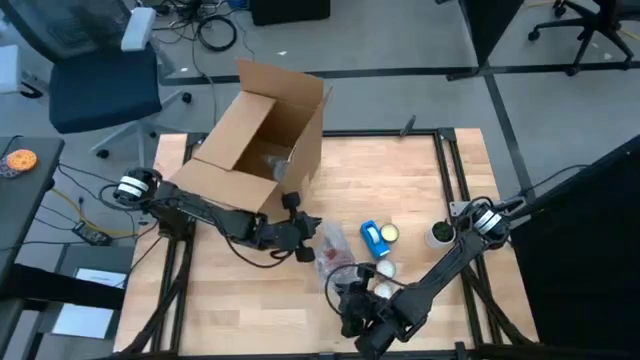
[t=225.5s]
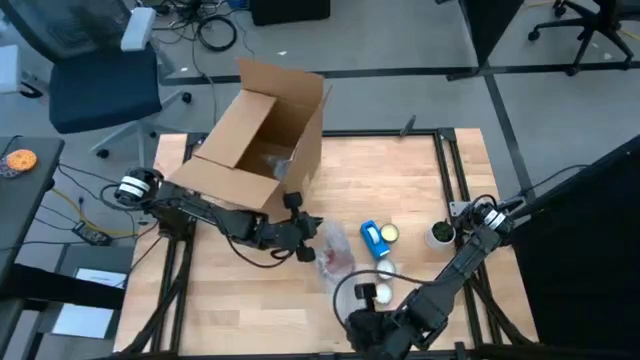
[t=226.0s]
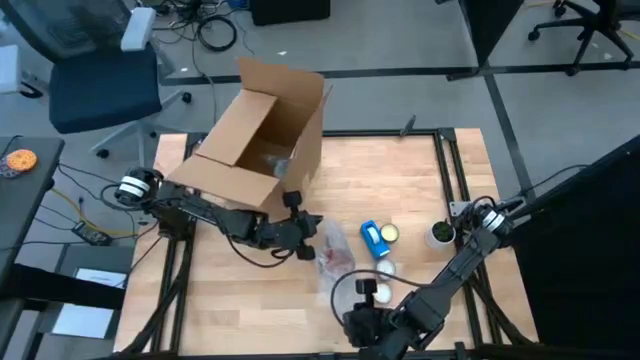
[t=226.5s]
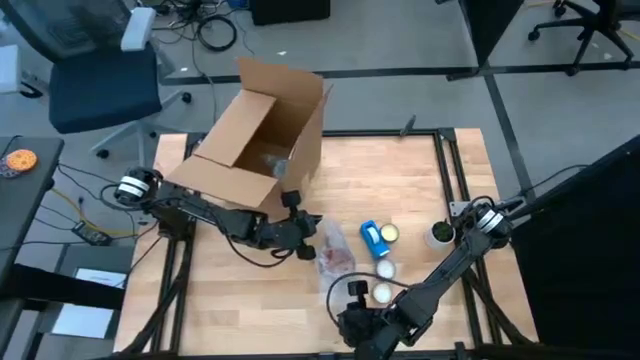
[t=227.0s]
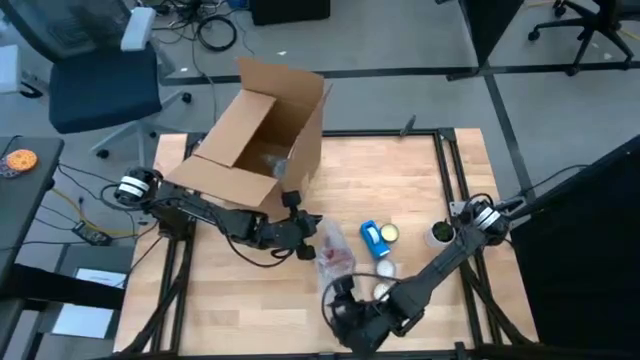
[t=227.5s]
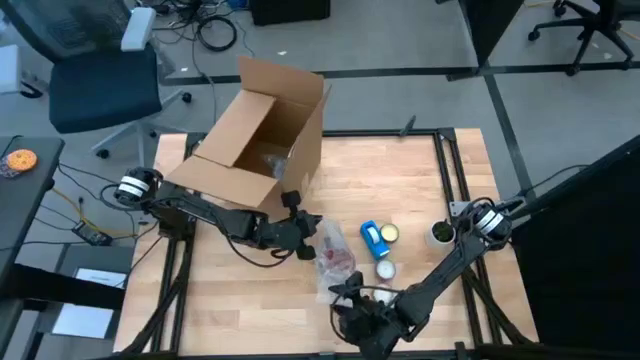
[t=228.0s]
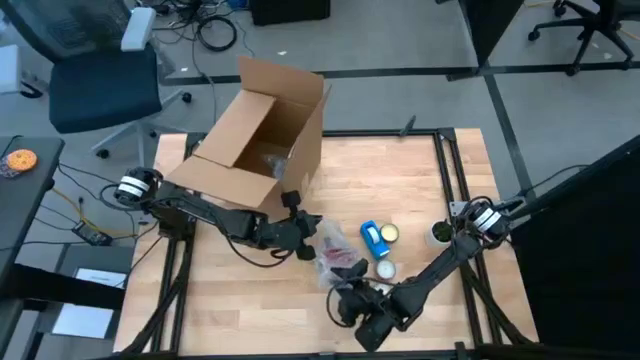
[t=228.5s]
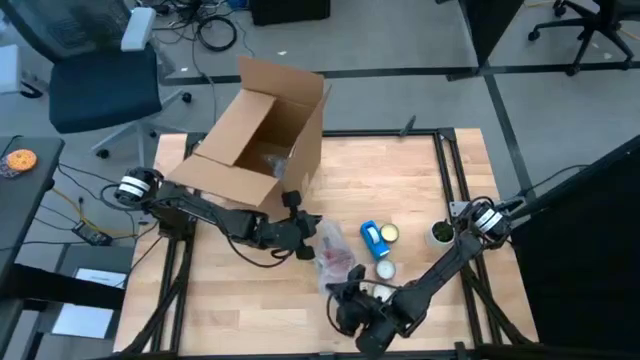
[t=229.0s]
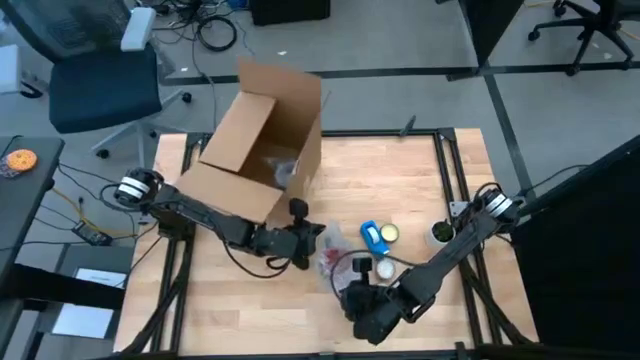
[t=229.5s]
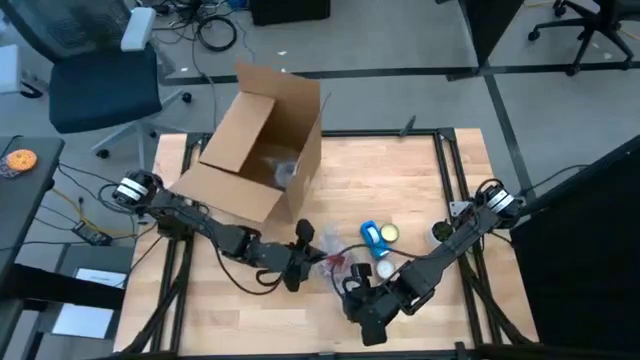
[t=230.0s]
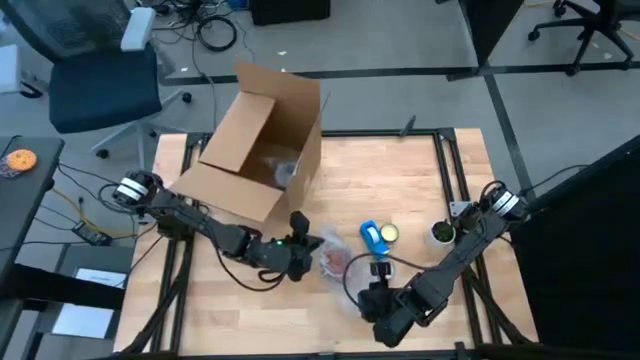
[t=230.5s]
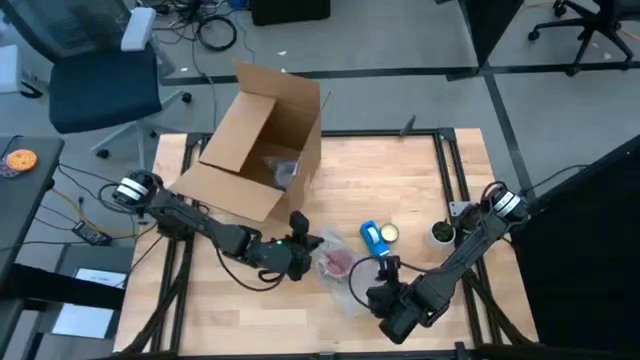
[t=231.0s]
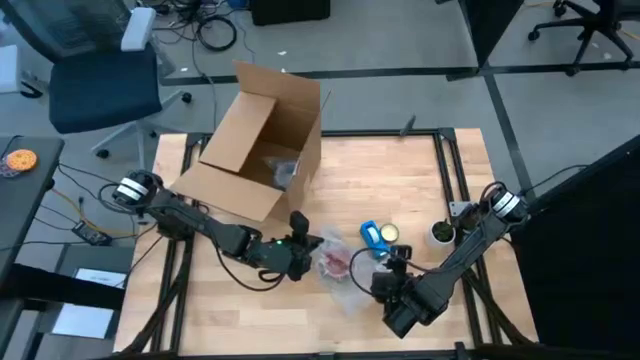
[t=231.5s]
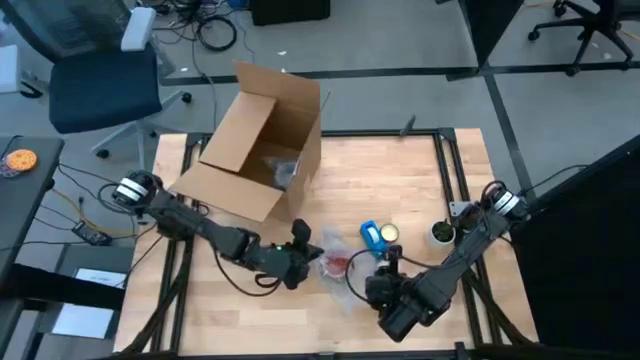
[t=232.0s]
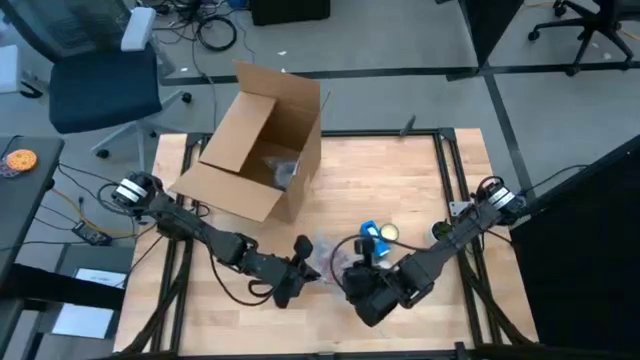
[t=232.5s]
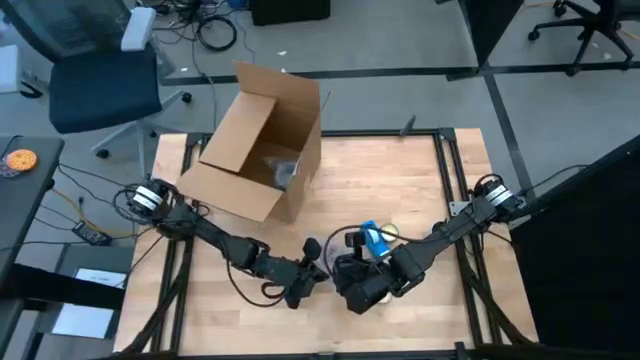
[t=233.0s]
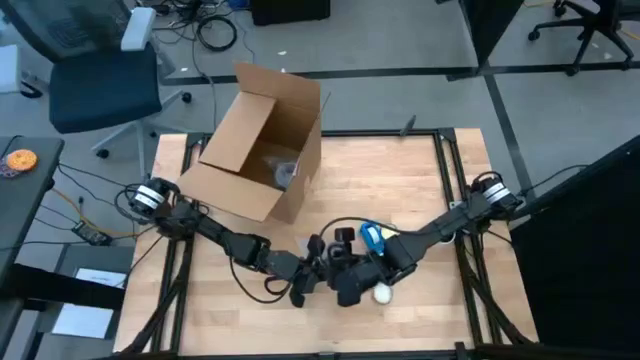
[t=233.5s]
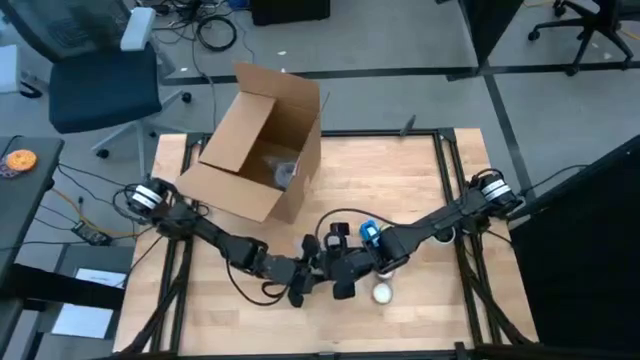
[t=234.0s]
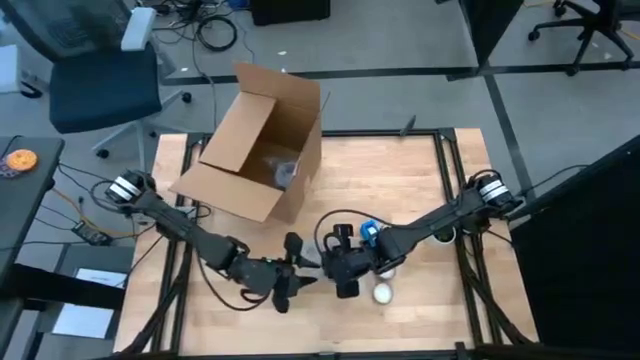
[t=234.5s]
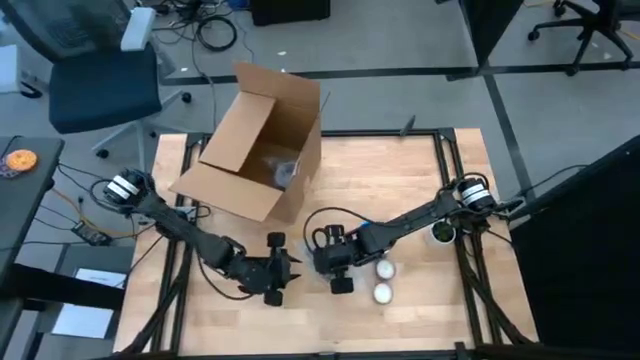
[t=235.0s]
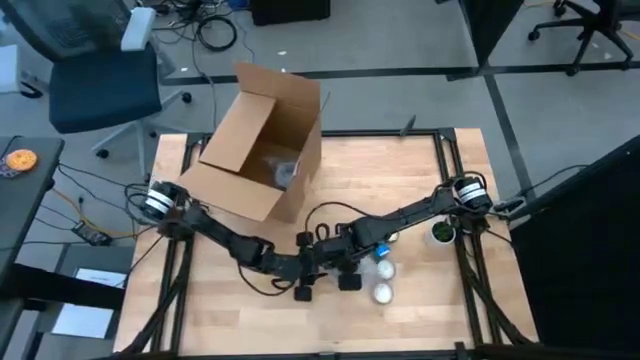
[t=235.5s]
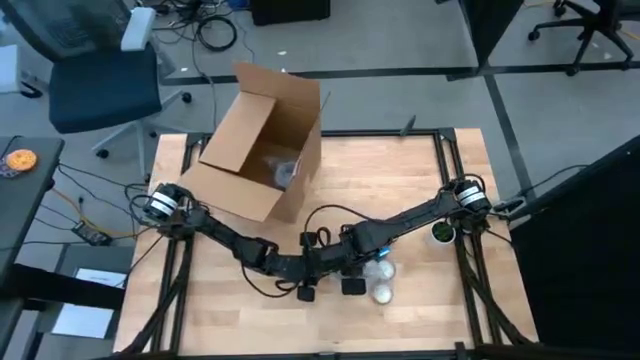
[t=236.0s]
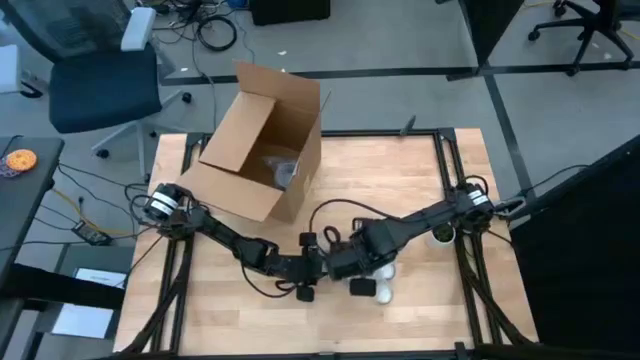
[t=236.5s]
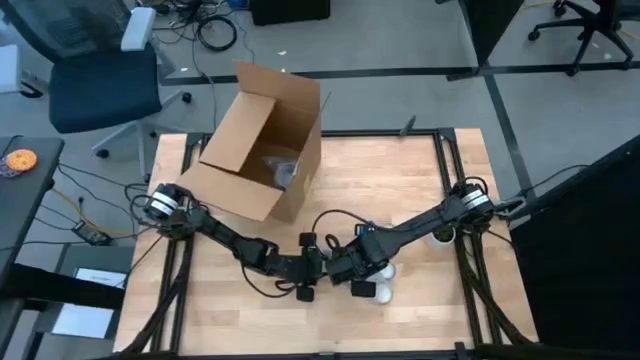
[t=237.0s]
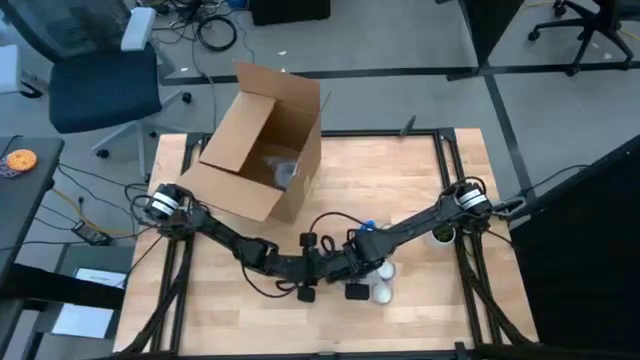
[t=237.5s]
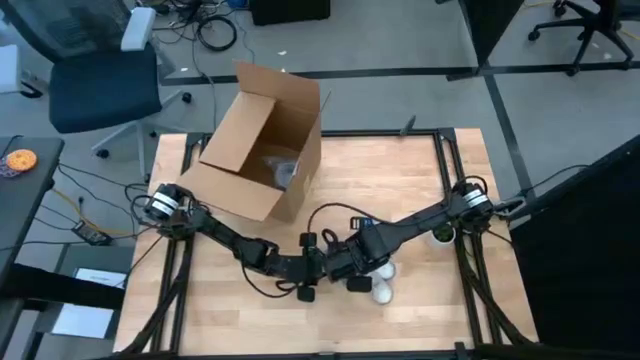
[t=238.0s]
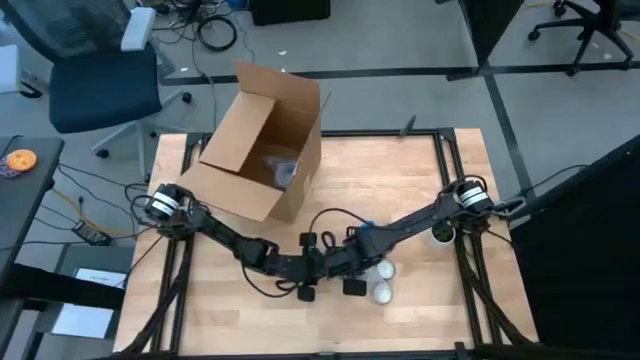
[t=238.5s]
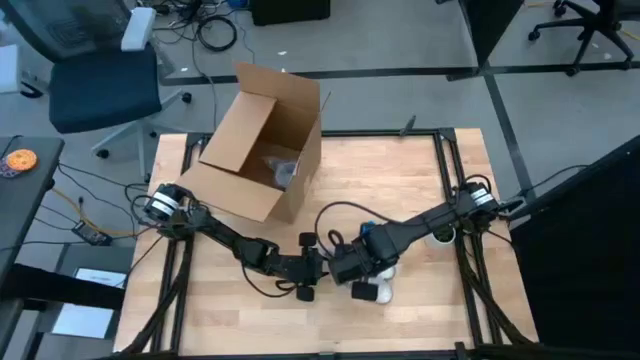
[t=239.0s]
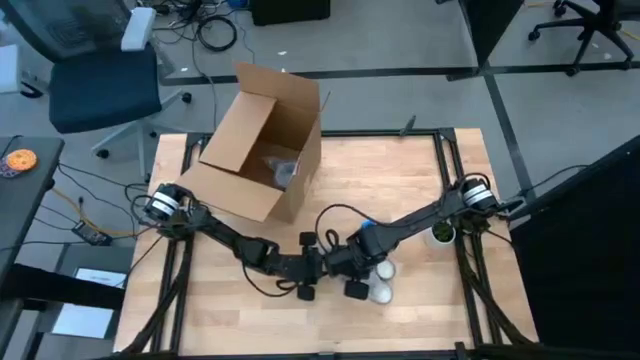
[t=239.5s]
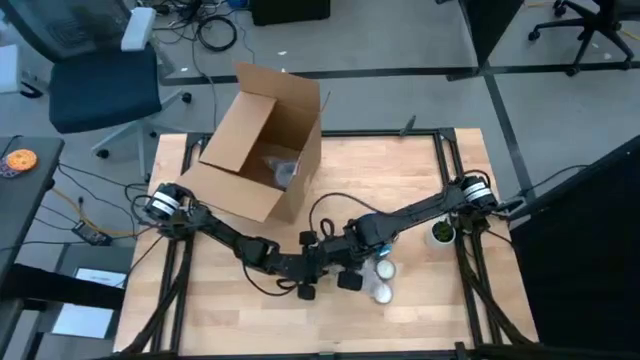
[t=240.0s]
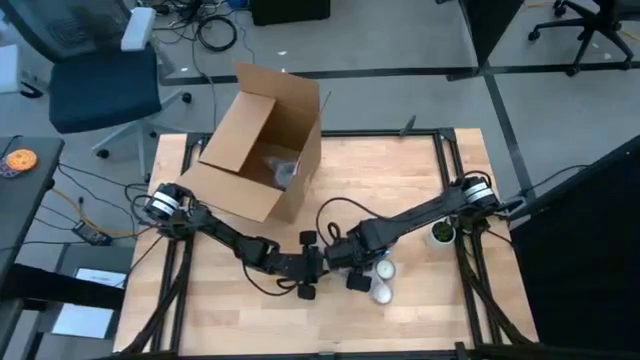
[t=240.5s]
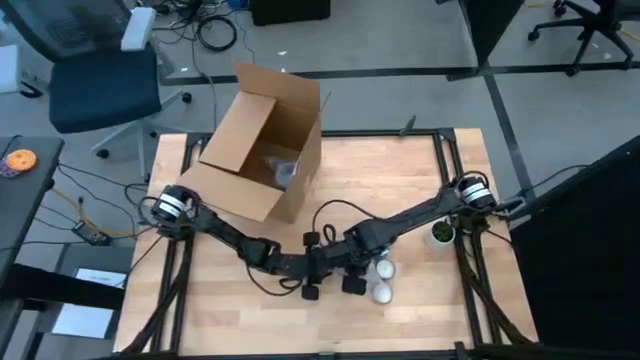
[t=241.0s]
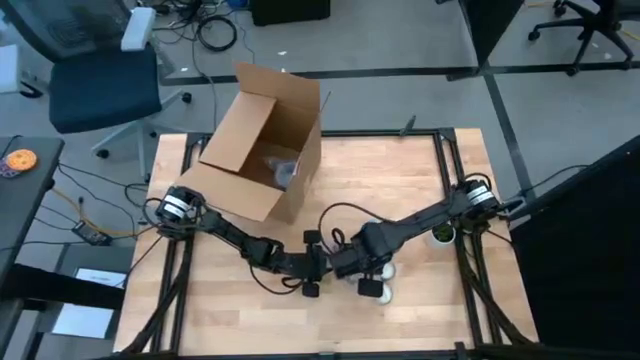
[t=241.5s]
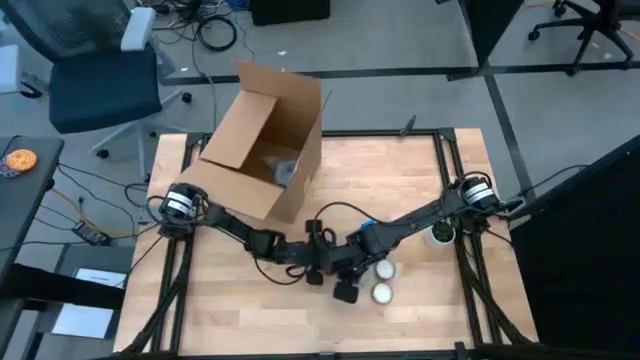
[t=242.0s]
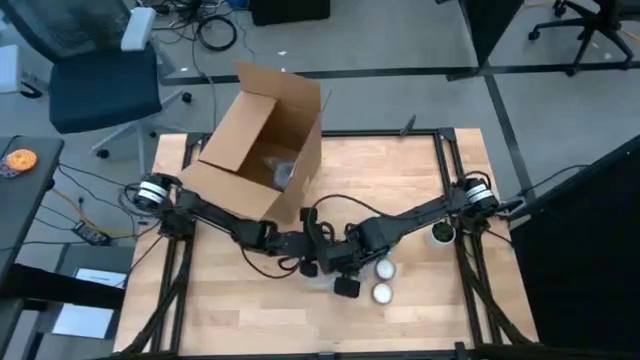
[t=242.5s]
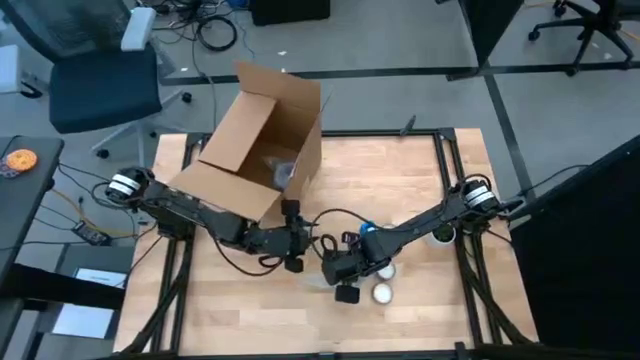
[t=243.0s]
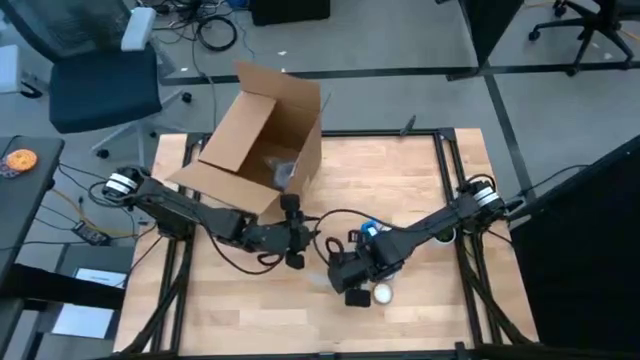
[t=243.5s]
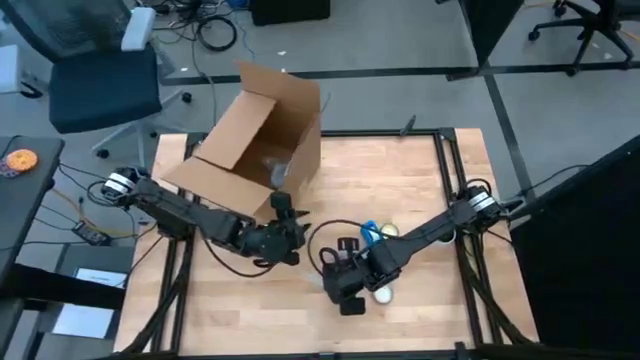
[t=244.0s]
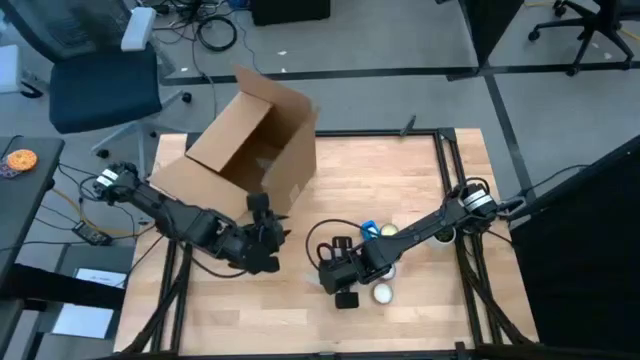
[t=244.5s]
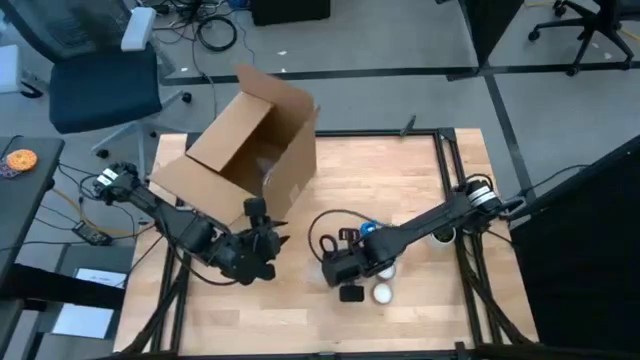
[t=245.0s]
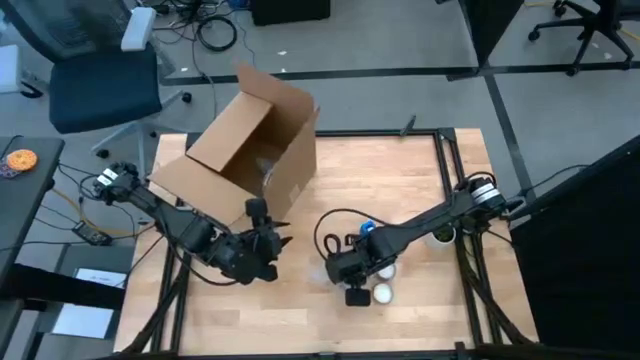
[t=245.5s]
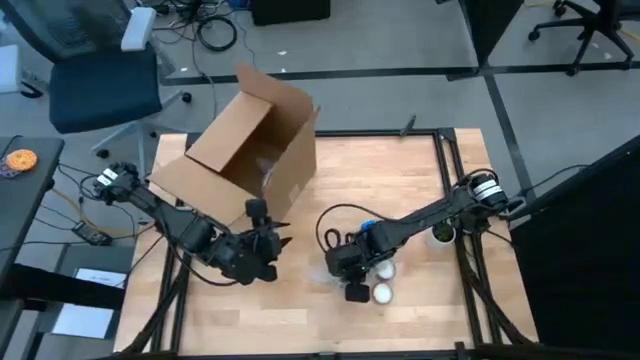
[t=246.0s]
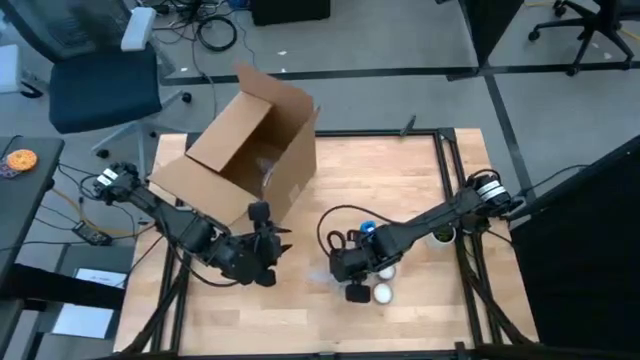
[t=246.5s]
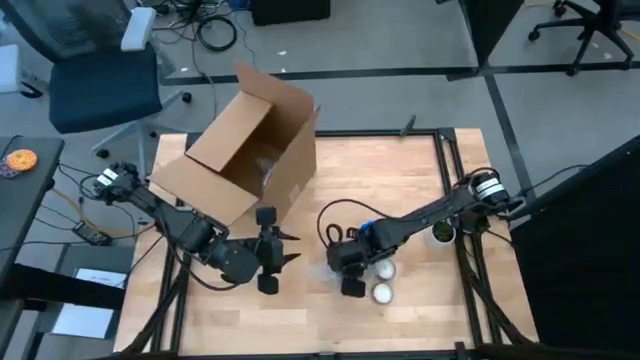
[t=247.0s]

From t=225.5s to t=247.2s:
Task: wrap mug
Wrap the mug with the bubble wrap
